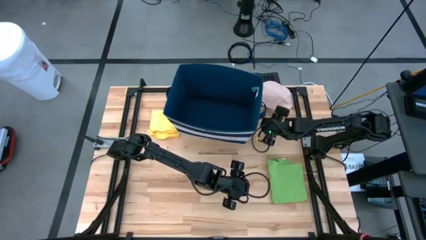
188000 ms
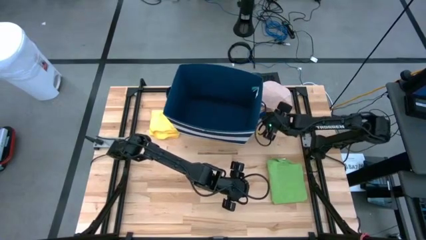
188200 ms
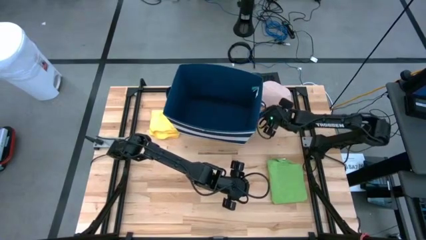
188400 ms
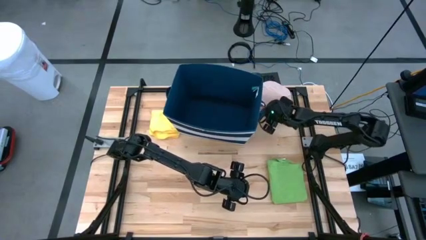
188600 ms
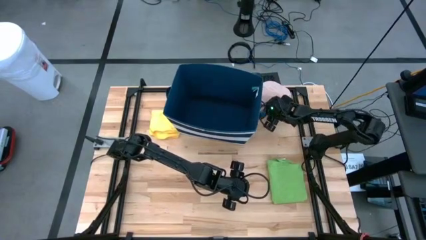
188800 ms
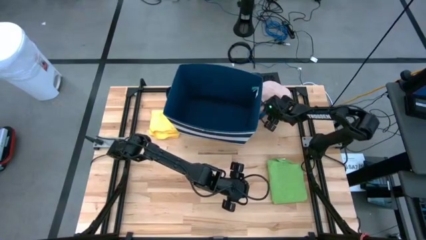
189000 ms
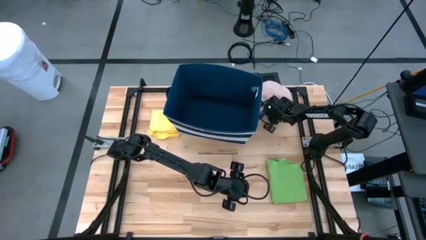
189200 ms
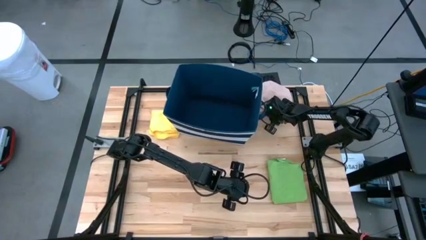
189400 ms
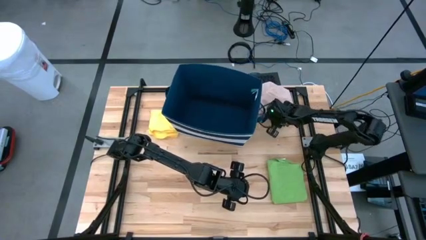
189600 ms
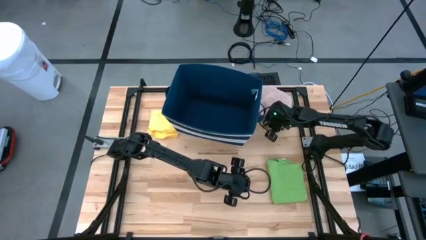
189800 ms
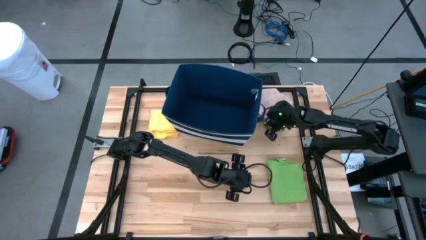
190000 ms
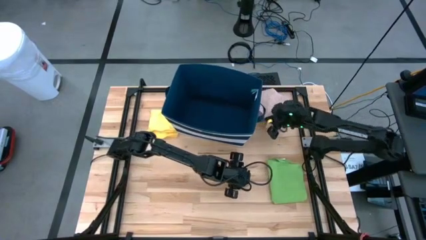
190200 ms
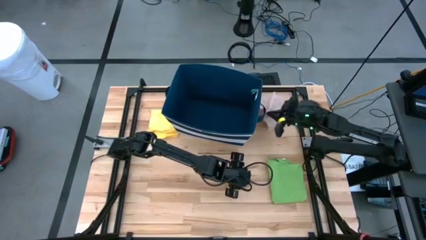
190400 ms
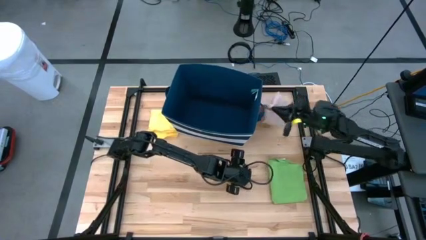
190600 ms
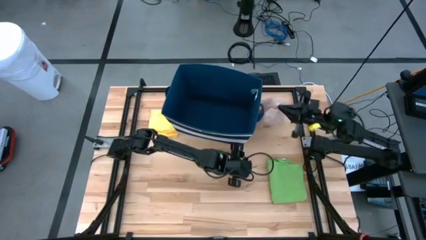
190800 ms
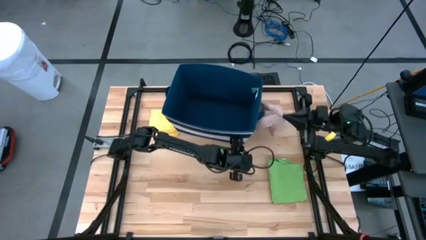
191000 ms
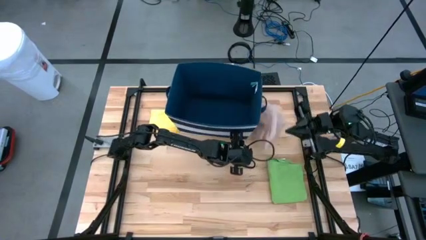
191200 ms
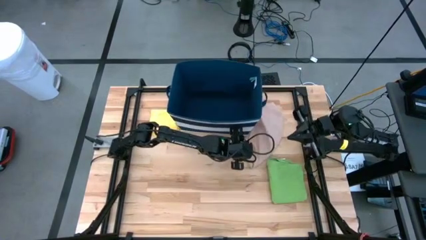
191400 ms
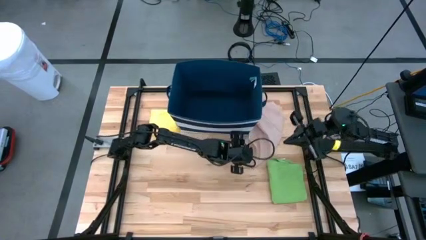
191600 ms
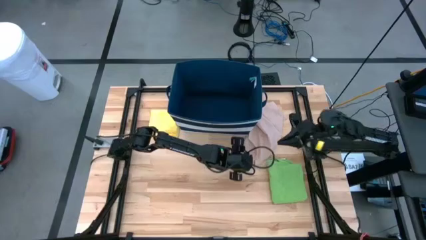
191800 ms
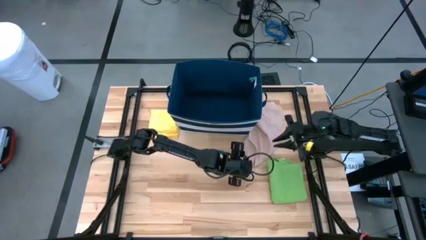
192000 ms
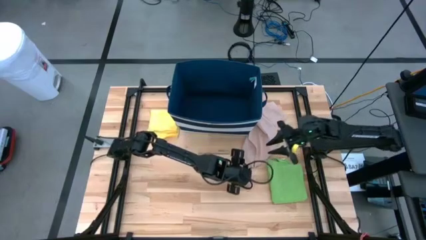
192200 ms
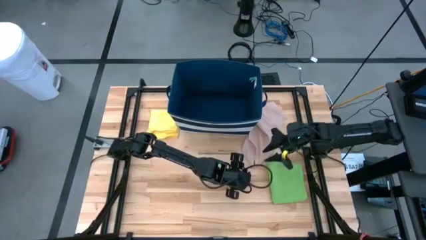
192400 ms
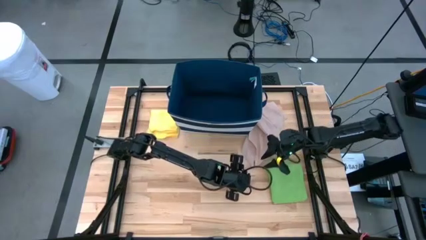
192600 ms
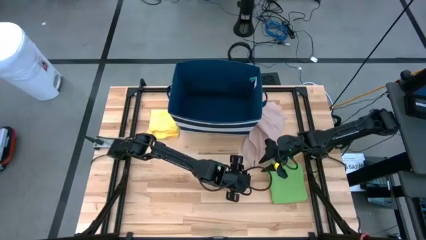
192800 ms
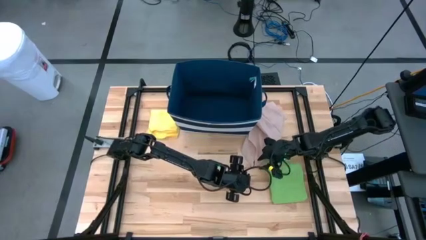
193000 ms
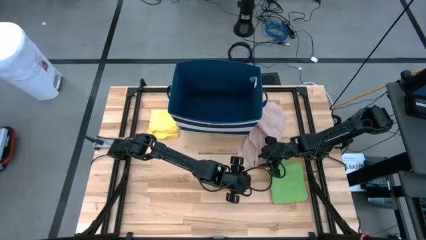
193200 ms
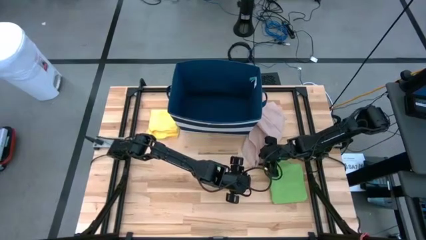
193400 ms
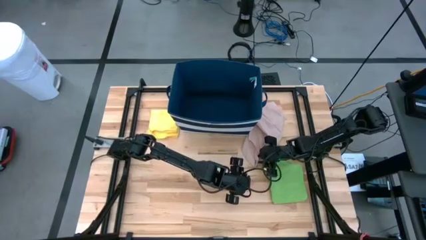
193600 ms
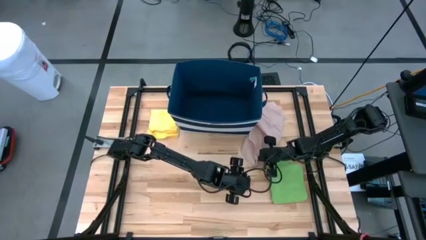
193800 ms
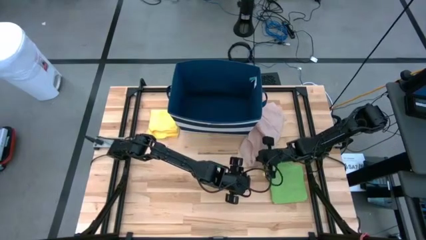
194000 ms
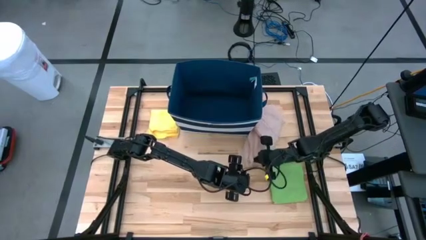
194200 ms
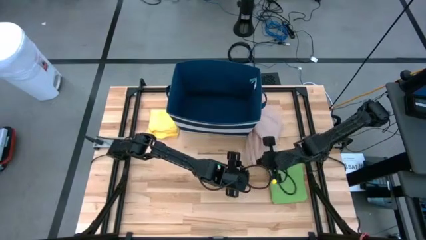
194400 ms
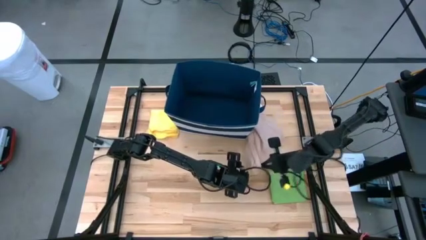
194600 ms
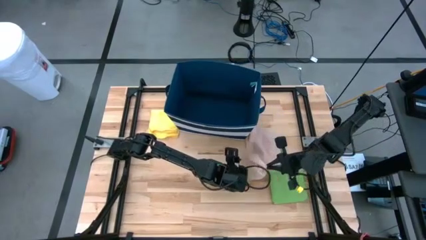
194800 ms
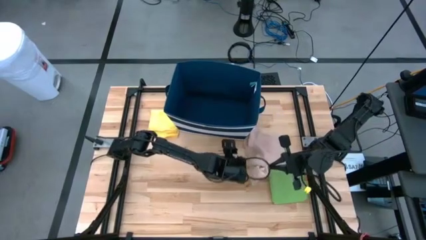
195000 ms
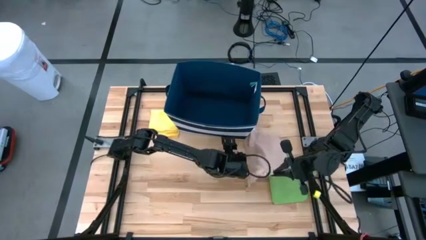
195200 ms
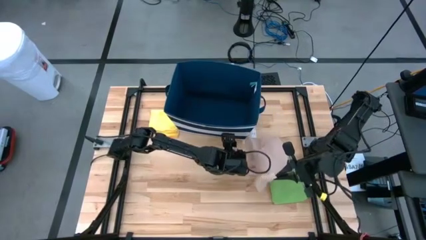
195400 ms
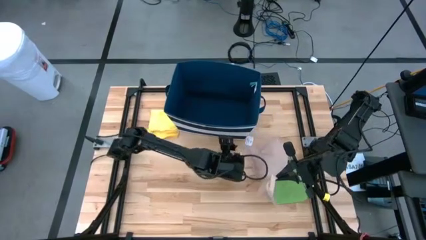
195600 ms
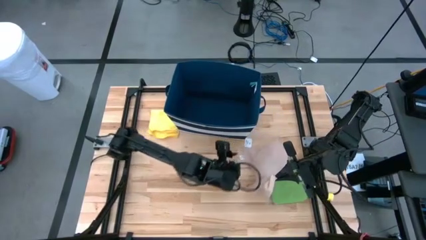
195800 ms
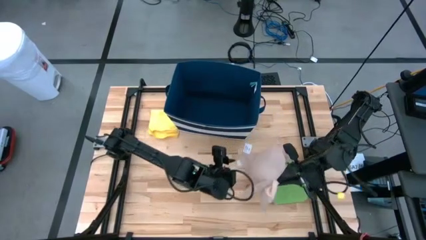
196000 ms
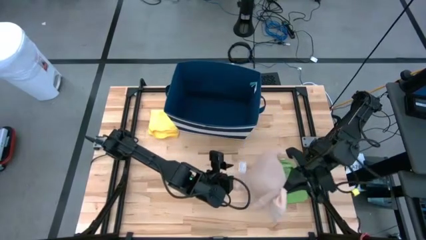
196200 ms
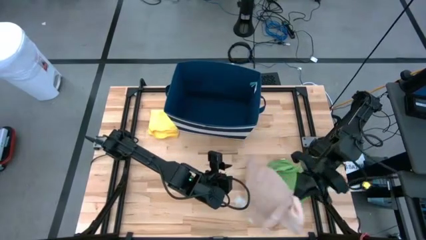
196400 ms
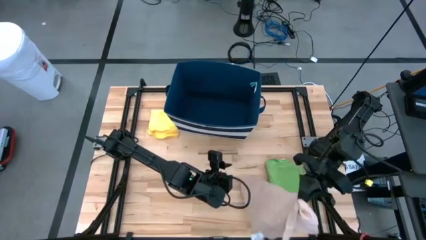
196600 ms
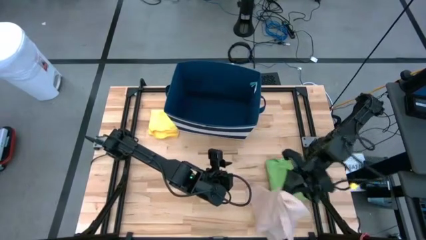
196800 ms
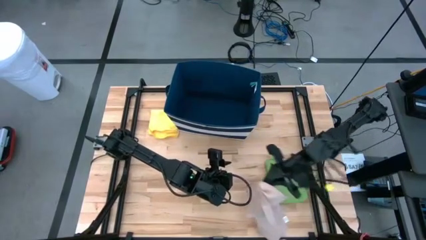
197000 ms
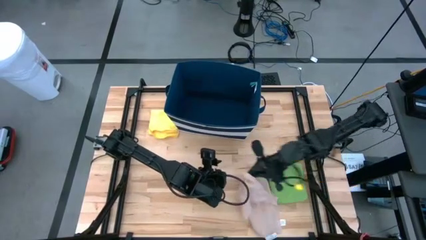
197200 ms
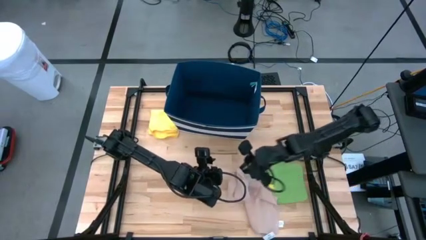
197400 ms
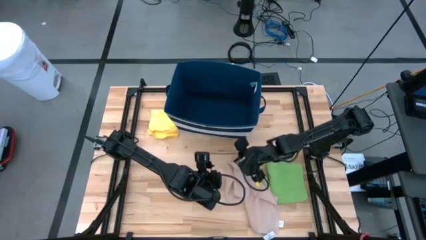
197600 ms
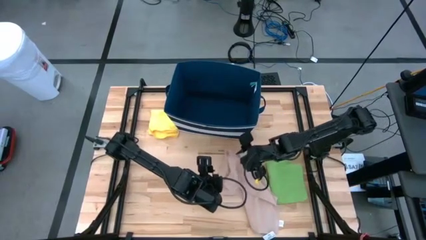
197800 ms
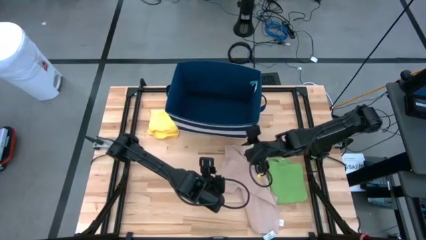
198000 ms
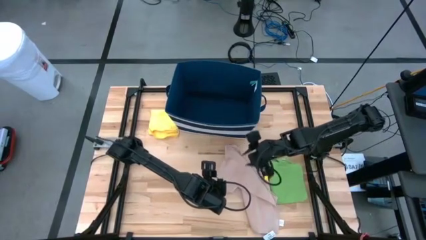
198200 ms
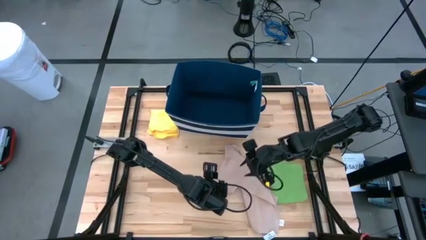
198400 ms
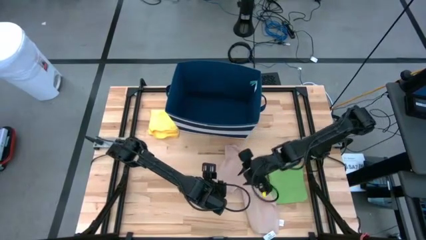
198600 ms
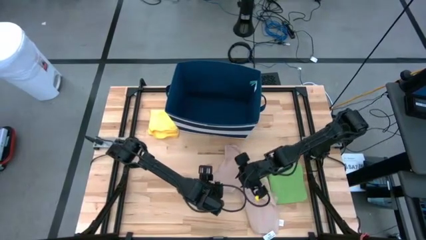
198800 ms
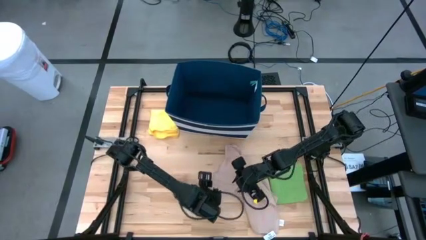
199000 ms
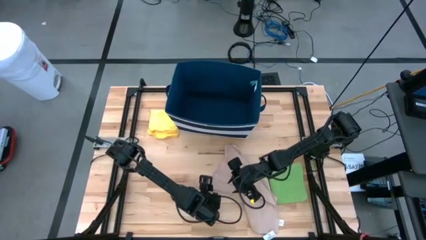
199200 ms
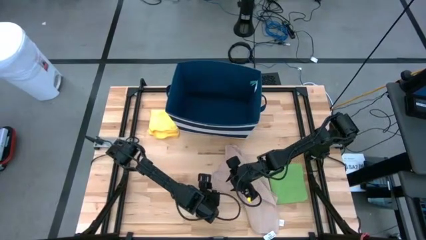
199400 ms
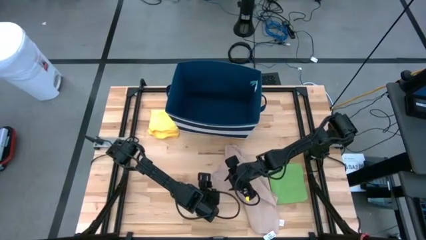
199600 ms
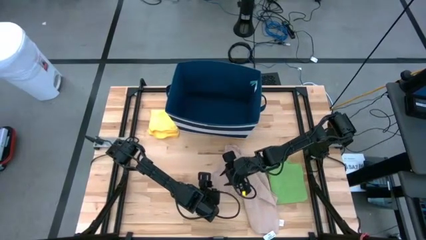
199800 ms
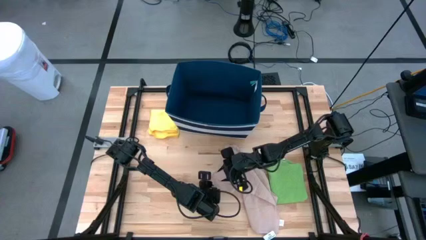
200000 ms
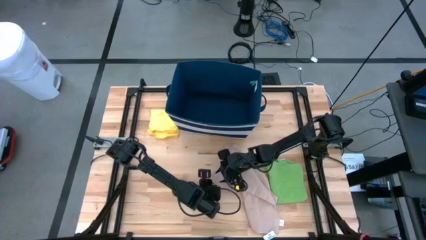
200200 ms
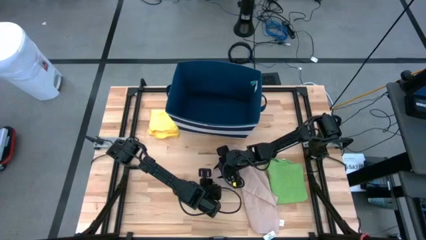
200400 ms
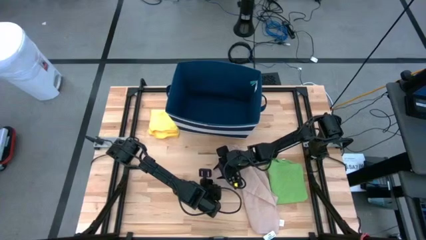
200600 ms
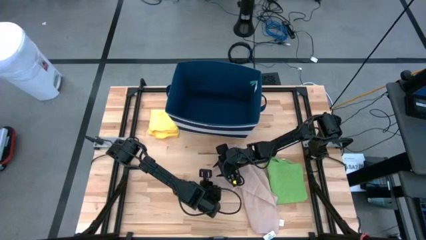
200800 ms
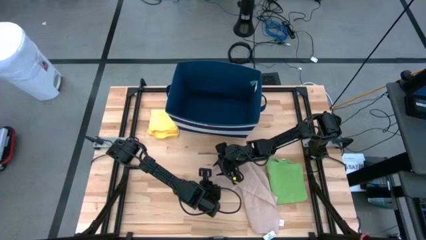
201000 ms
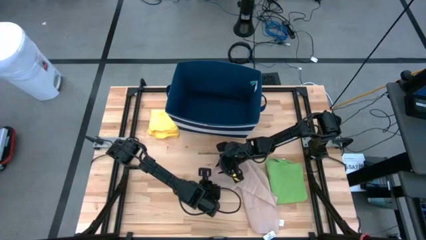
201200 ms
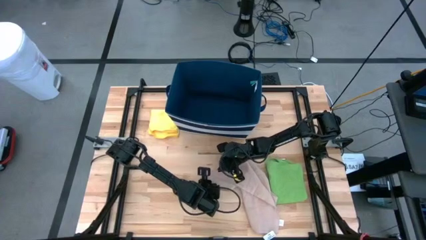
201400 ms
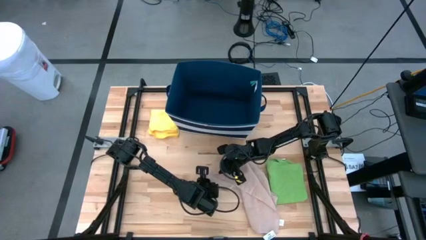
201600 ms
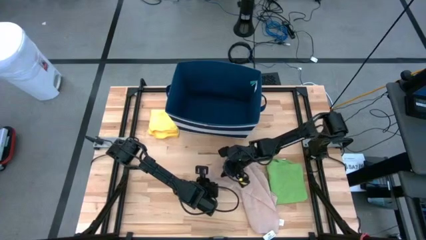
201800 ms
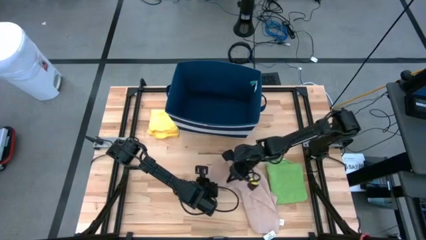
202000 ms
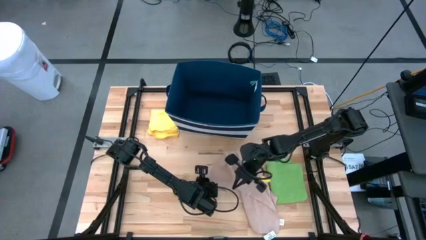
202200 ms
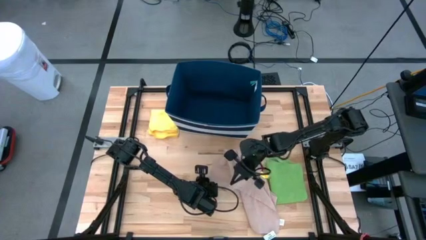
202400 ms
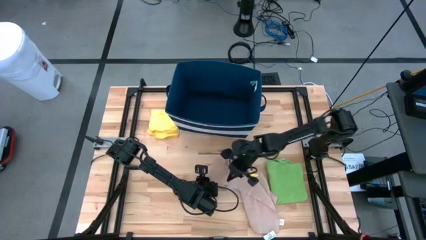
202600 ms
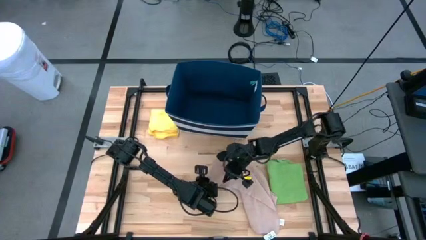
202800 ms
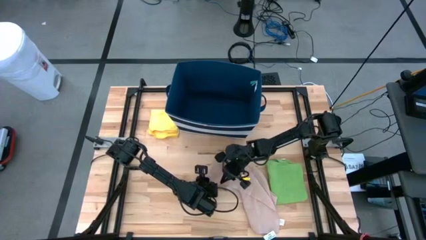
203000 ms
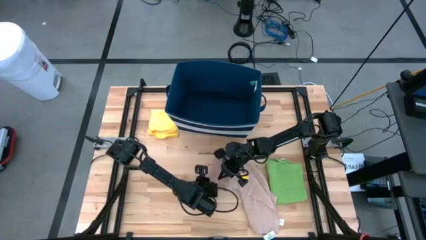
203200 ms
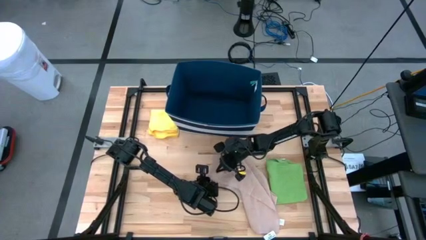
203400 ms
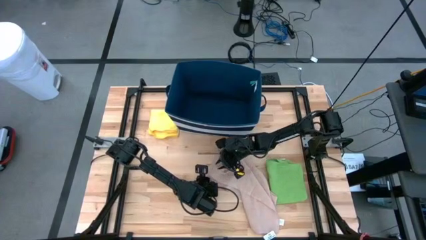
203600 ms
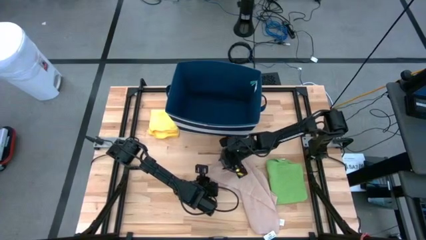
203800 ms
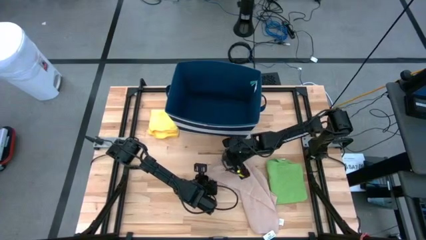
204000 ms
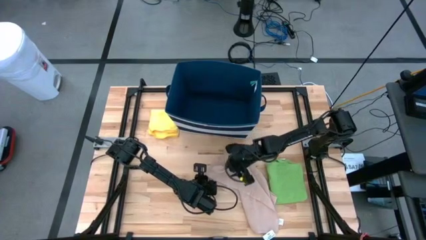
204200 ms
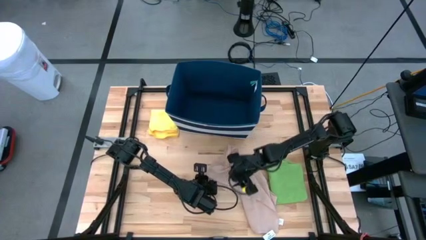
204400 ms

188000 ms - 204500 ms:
Task: Fold towel
Fold the light pink towel

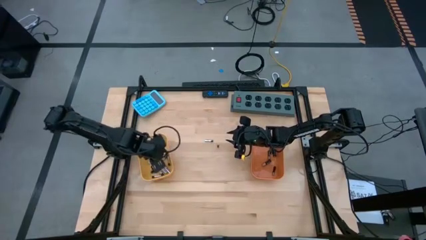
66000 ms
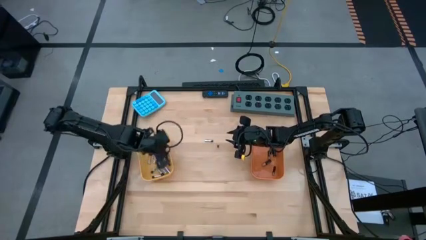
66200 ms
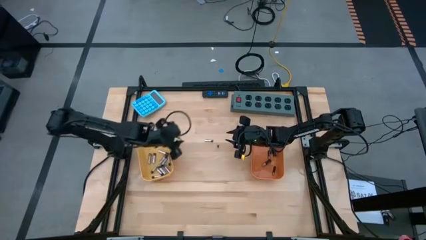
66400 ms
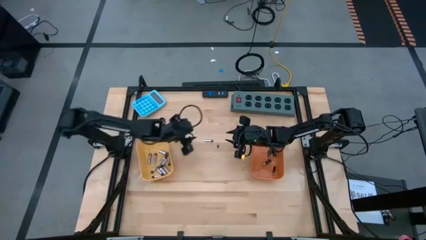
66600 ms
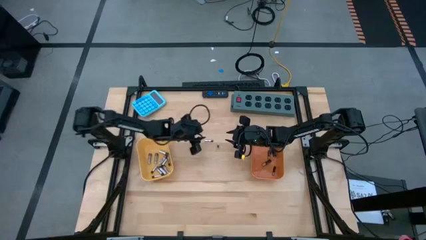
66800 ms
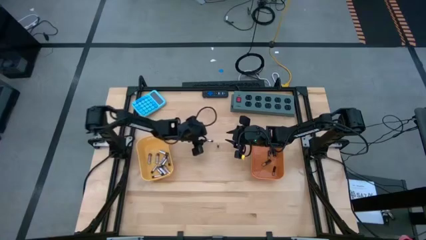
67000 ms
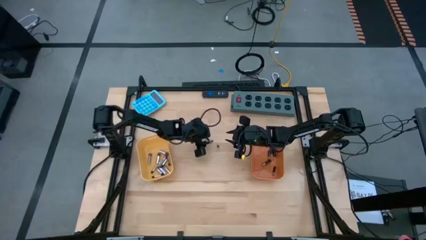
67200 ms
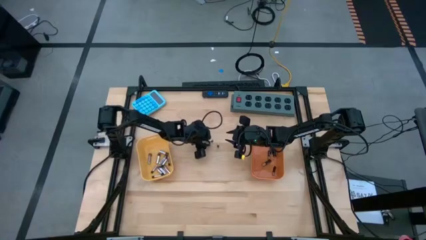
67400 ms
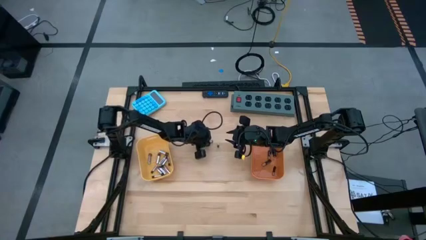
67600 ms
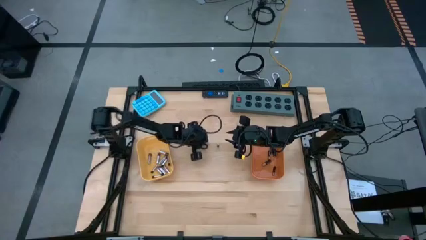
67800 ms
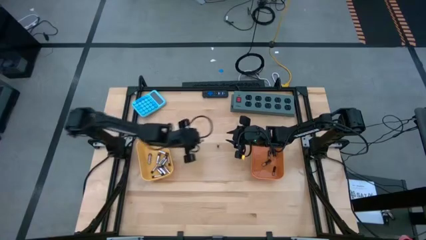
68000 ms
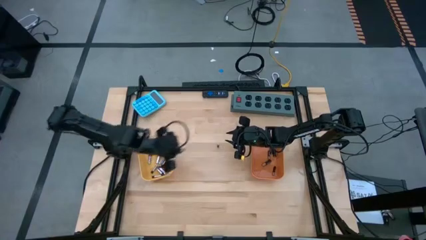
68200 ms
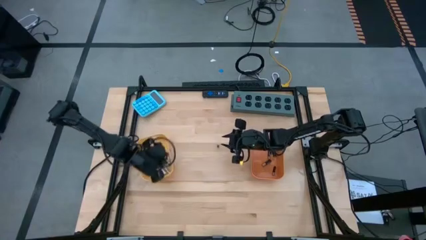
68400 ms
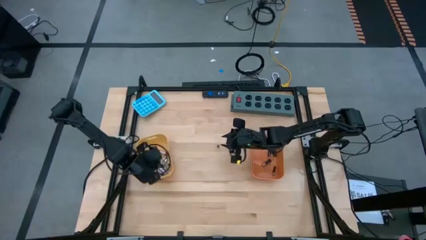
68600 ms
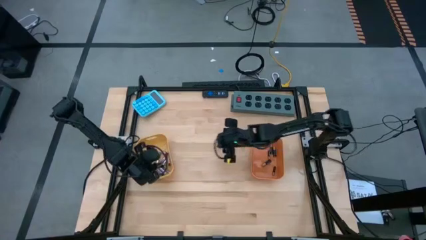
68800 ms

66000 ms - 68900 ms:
Task: Sort batteries
Put the silver battery into the yellow bin
